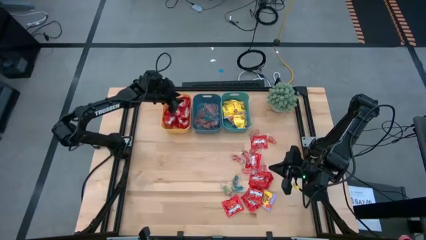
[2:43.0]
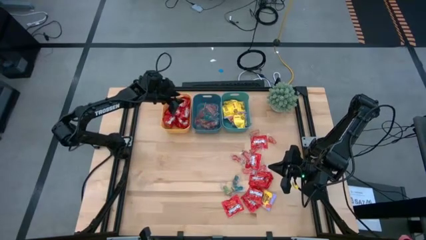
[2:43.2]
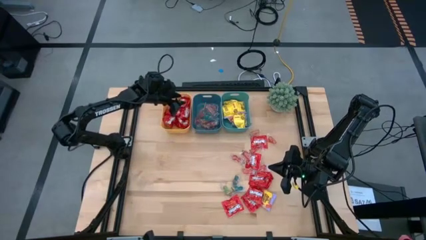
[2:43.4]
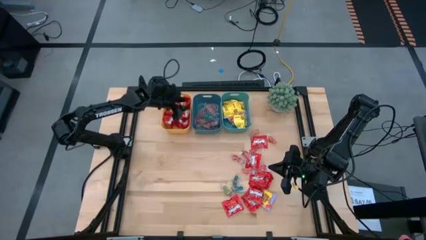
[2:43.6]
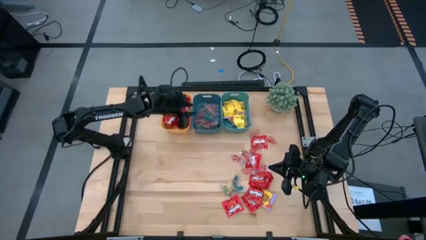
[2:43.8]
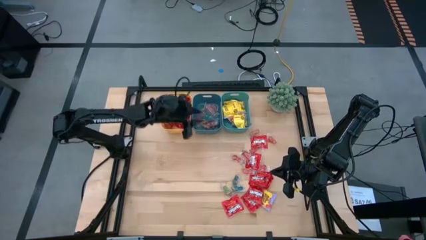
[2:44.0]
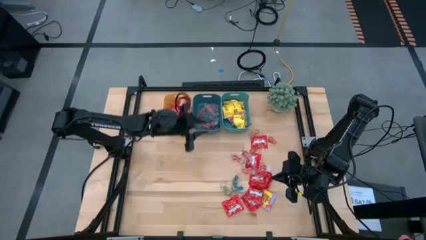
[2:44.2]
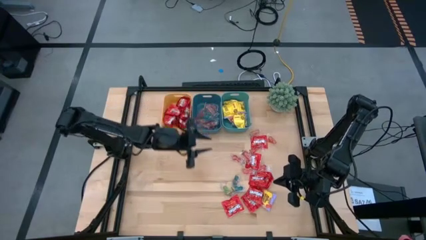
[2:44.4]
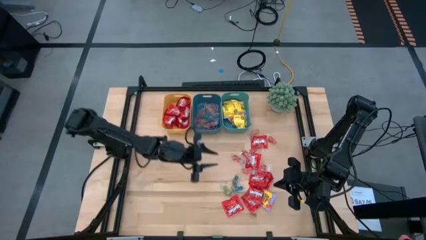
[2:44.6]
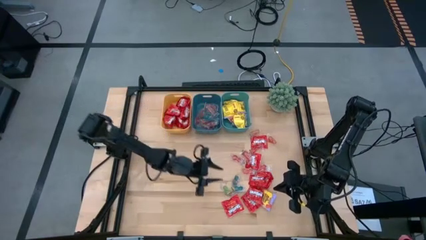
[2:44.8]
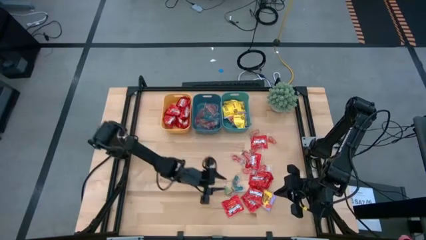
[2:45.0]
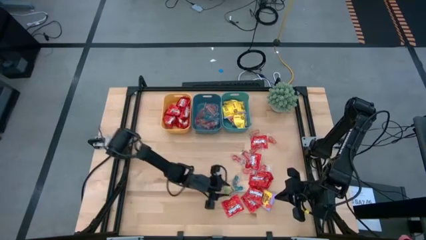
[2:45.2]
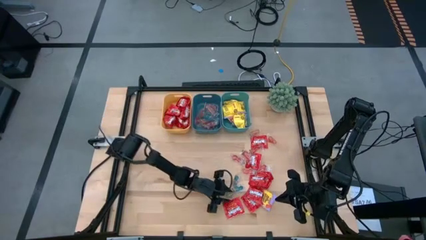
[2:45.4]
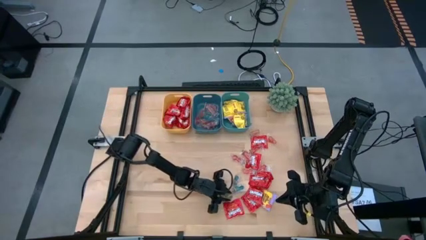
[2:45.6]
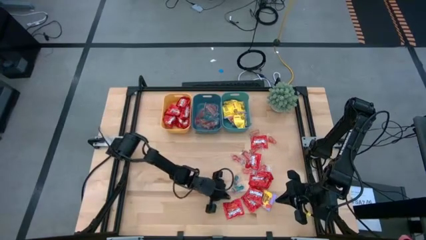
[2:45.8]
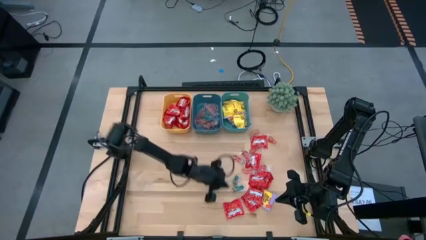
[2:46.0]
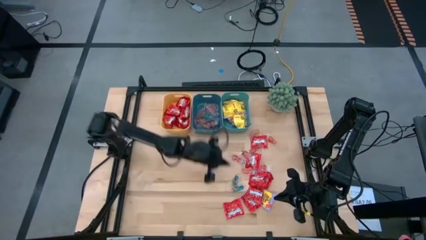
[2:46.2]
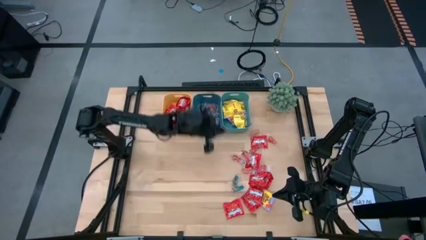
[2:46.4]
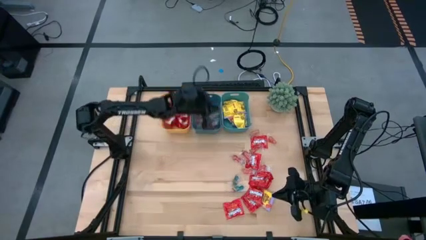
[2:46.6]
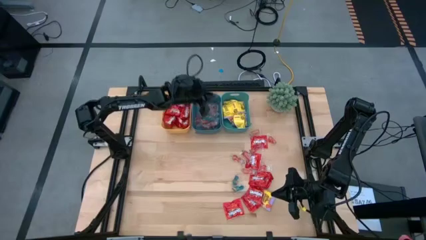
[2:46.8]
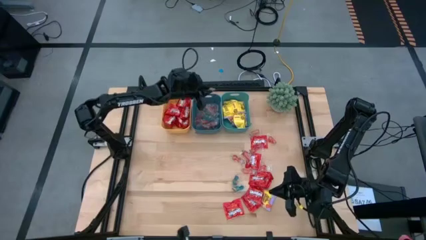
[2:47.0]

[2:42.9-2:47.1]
Task: Sort candy
Put the transparent orange gummy into the blue bin

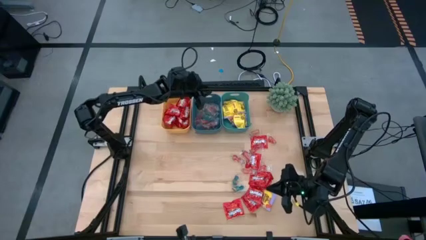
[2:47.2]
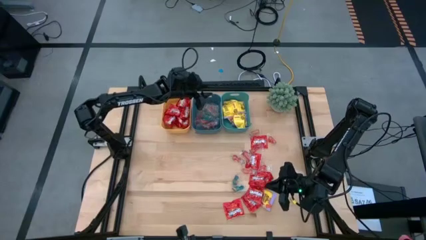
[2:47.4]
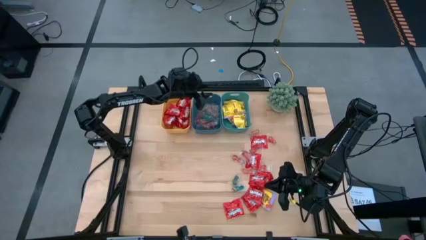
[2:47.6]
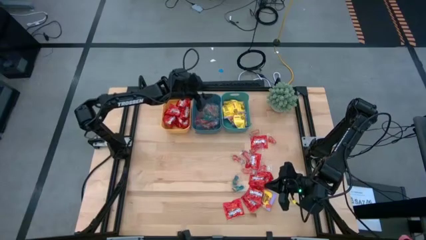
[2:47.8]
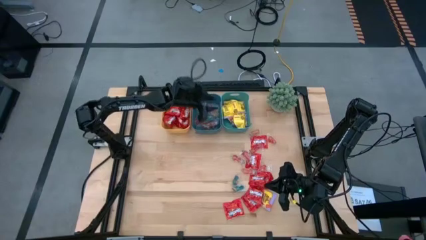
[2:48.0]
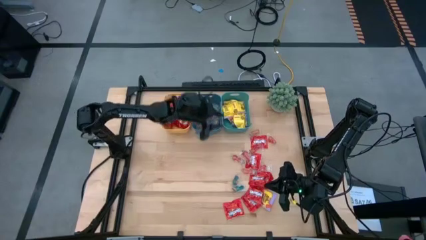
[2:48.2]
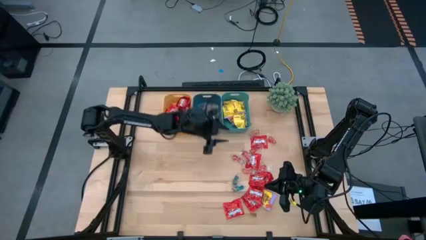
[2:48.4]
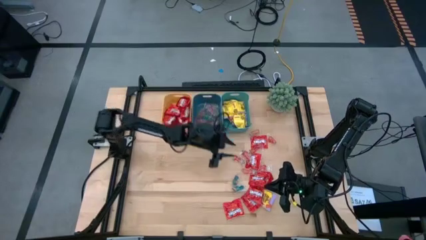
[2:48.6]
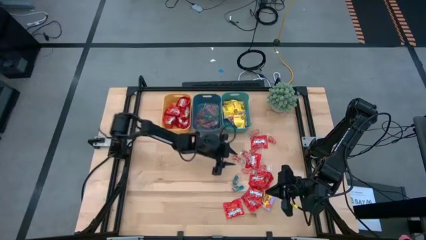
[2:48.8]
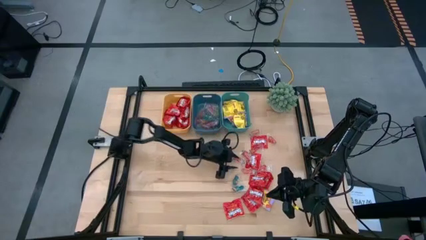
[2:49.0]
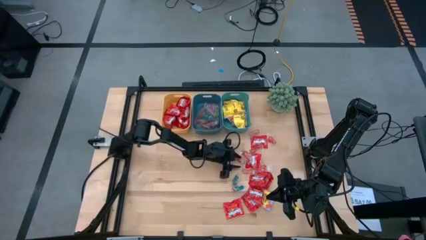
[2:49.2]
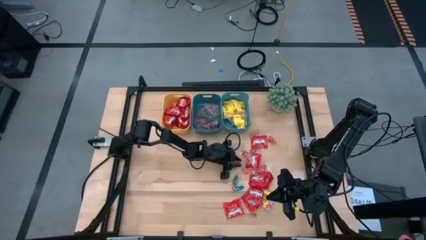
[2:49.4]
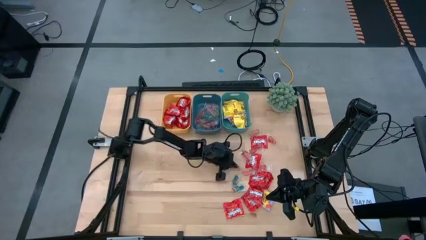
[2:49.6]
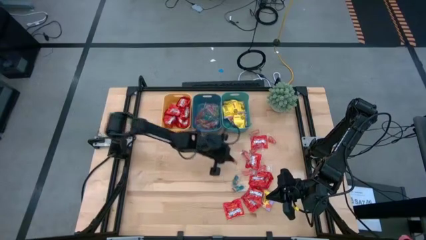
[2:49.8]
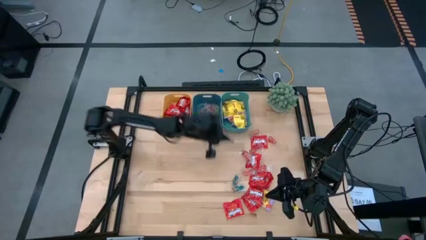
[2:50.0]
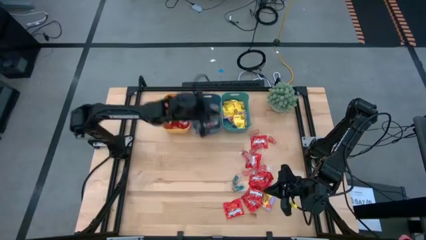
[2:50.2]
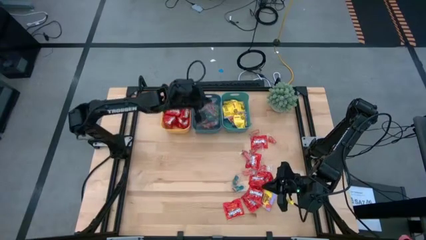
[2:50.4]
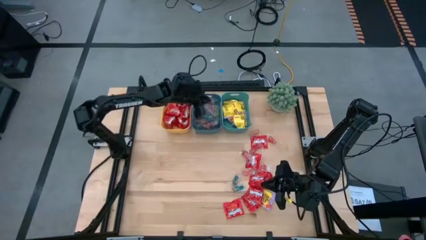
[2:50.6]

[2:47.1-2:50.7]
Put the transparent red gummy into the blue bin

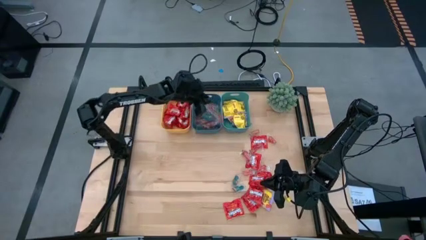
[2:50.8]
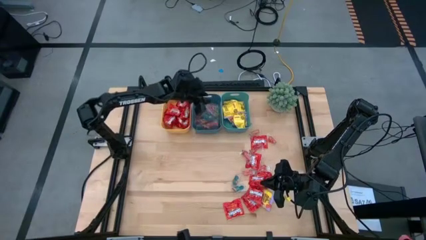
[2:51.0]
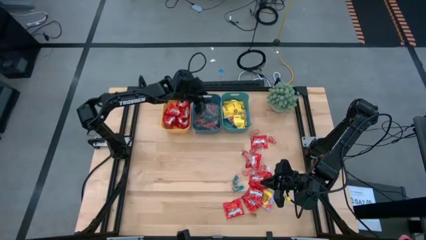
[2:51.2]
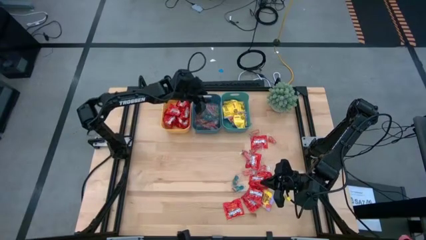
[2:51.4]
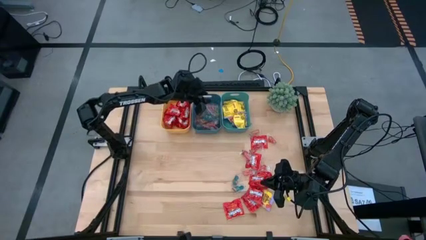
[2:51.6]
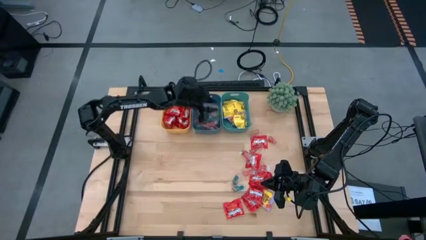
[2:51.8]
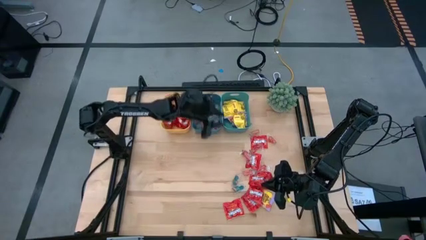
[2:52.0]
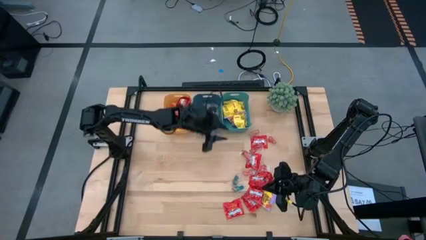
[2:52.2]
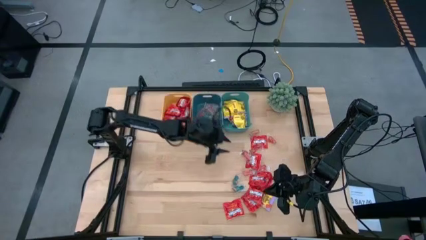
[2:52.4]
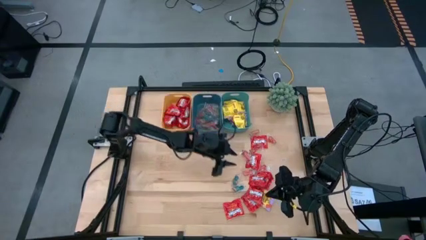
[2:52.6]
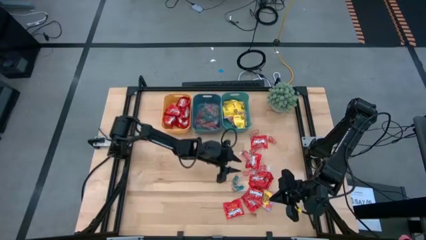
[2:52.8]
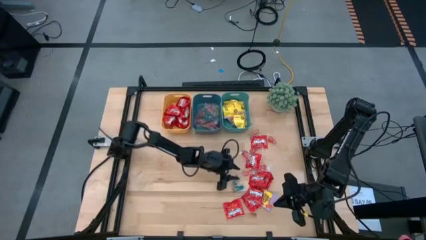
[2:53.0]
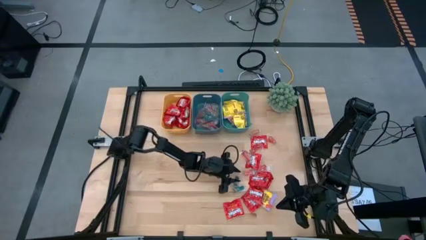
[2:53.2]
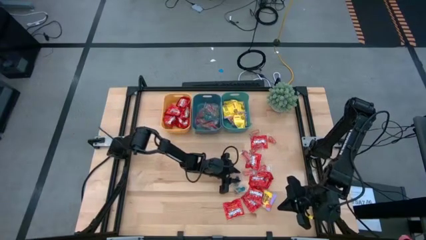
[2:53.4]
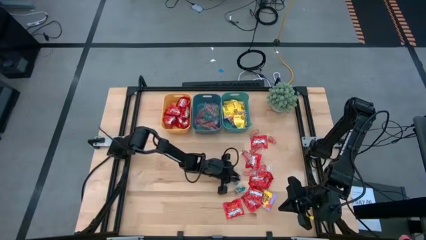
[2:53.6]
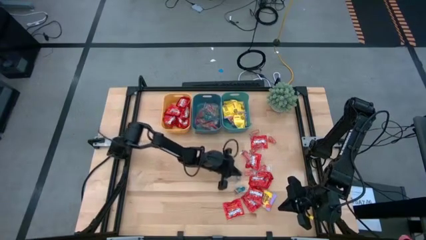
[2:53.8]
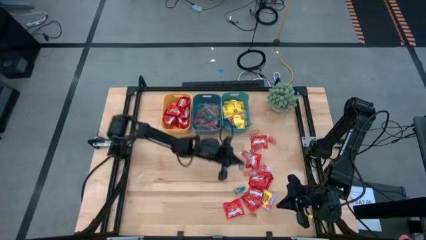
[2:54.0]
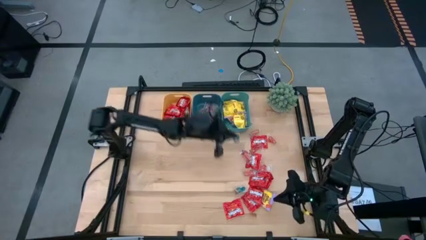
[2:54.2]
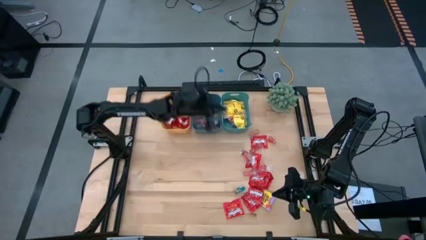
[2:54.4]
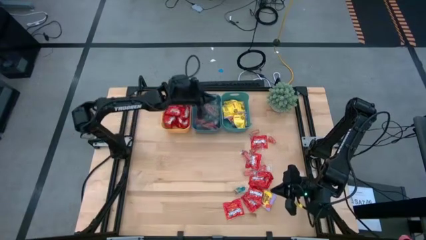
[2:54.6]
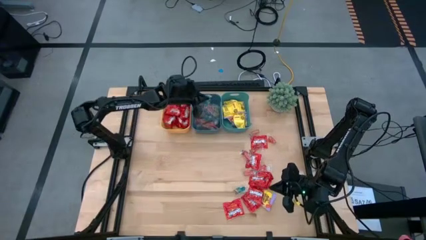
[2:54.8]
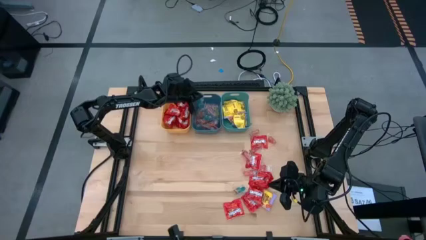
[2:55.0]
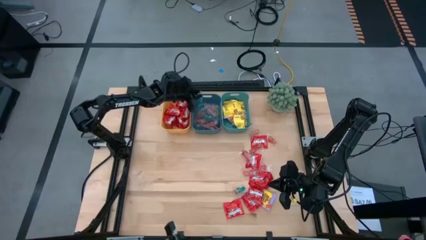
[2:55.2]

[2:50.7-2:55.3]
Put the transparent blue gummy into the blue bin

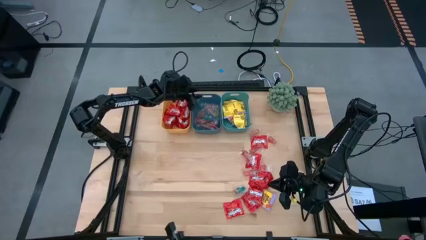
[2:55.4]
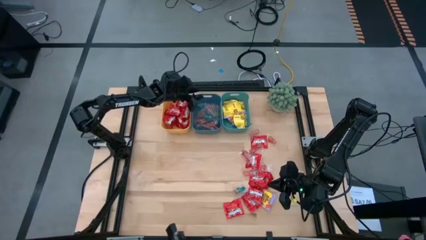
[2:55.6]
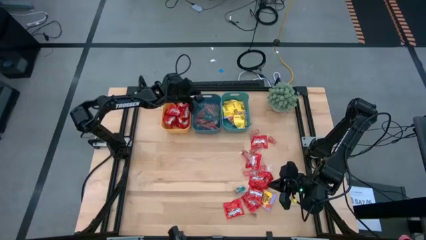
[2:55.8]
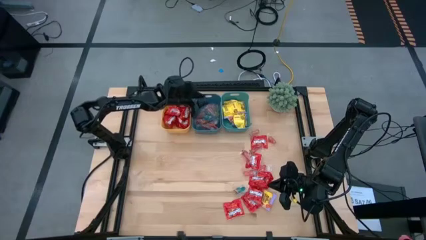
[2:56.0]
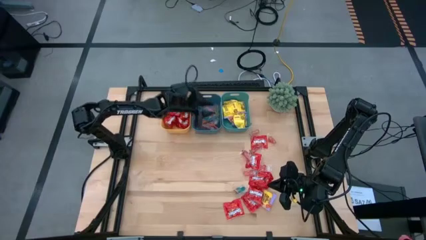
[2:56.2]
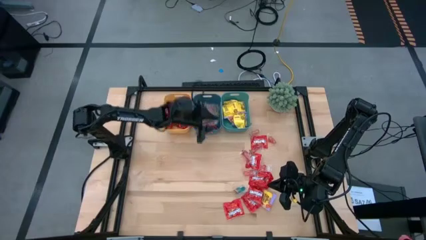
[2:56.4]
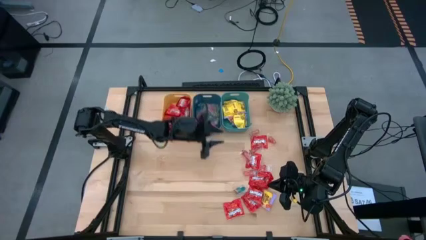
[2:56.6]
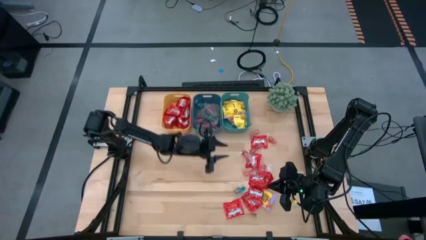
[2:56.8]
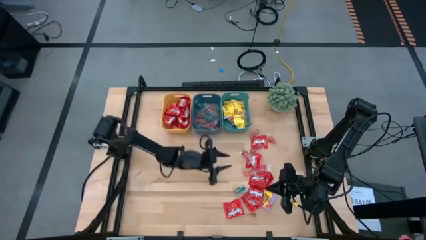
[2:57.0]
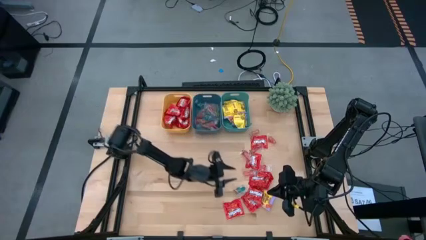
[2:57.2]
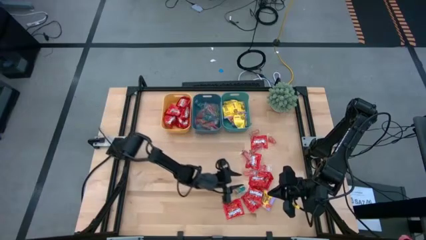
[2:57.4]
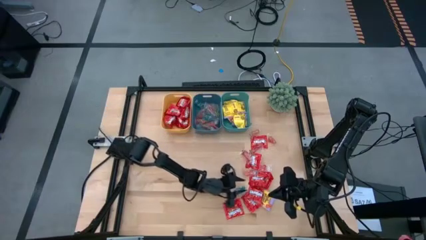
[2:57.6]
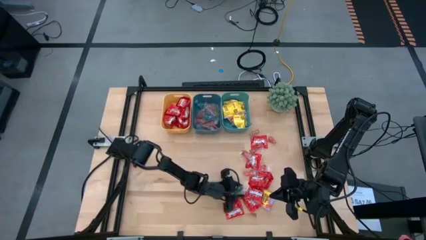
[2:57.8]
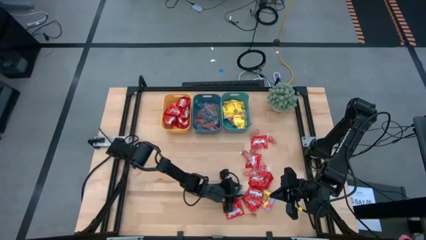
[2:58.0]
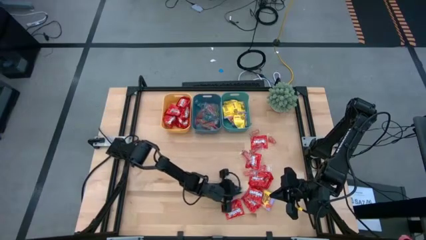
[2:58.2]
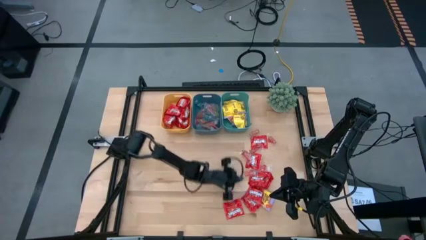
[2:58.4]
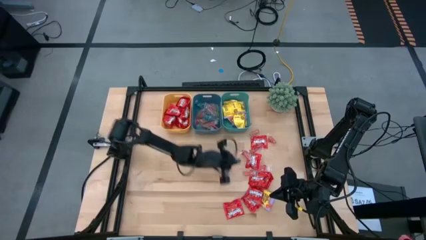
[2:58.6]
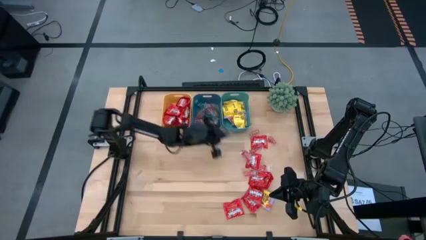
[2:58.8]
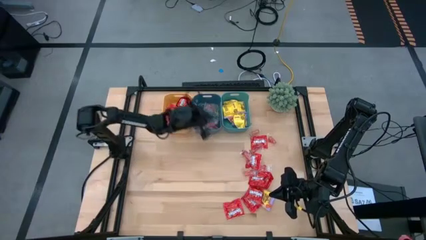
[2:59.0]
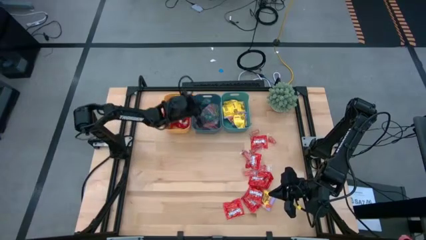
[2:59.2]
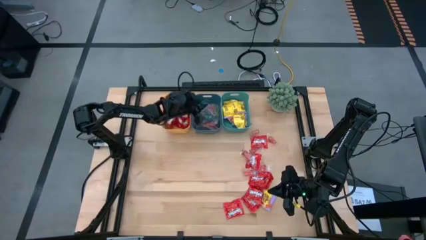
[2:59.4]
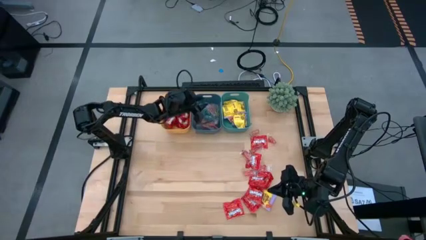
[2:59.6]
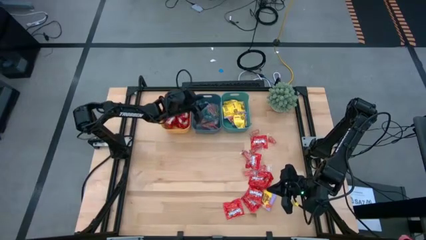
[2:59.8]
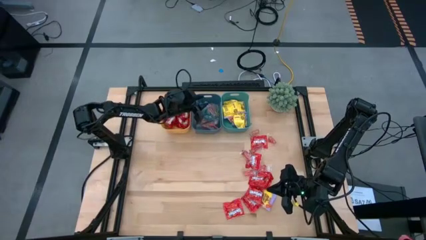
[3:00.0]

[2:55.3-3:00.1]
Put the transparent blue gummy into the blue bin
